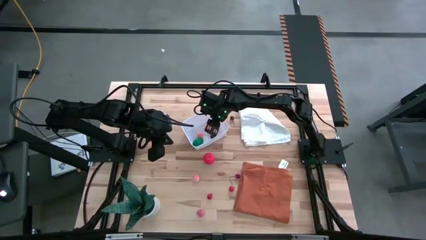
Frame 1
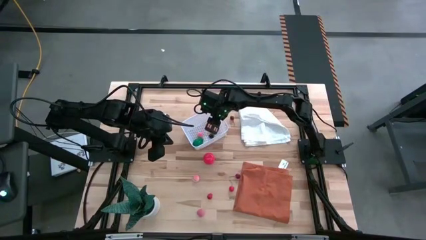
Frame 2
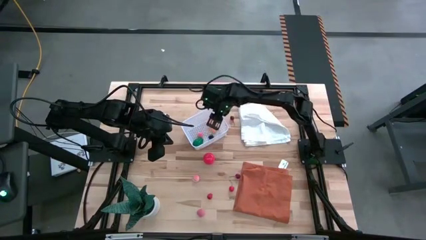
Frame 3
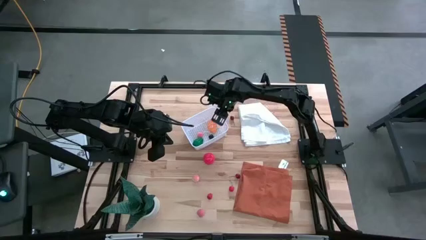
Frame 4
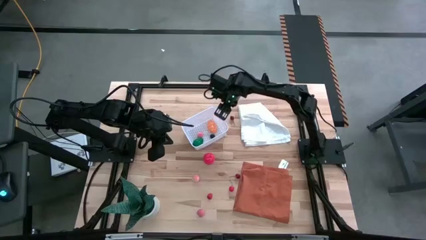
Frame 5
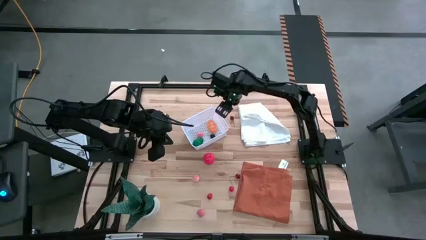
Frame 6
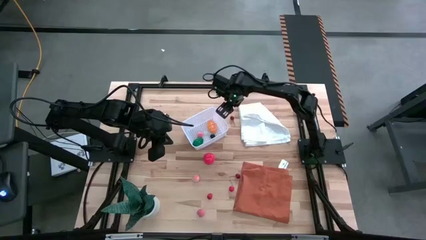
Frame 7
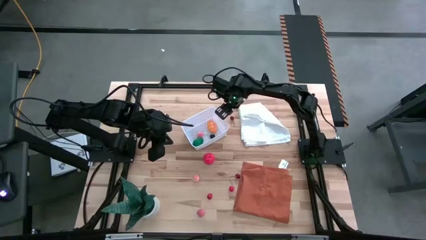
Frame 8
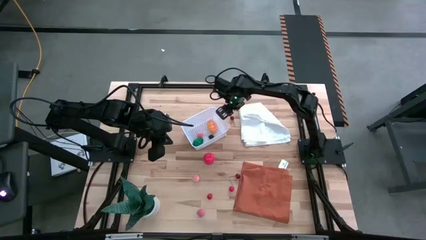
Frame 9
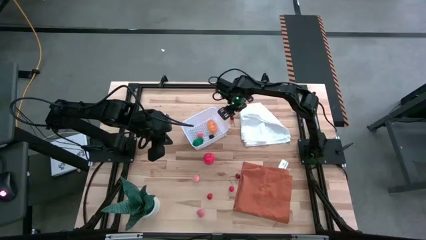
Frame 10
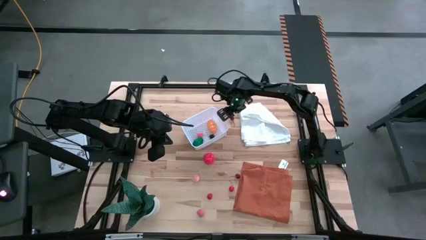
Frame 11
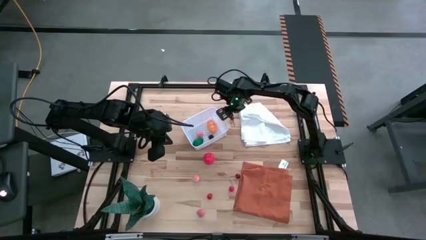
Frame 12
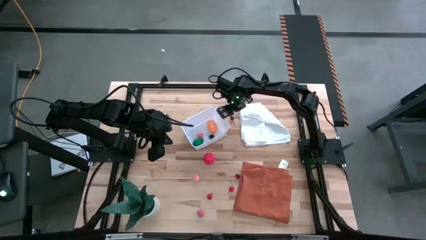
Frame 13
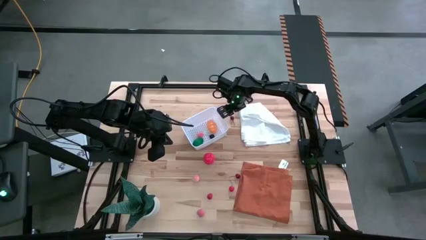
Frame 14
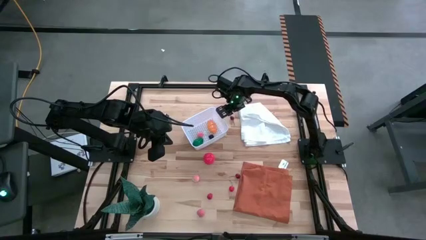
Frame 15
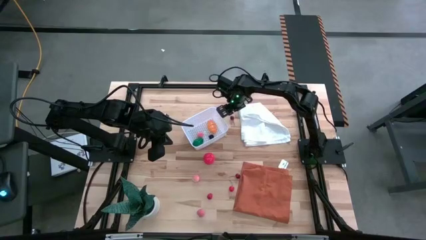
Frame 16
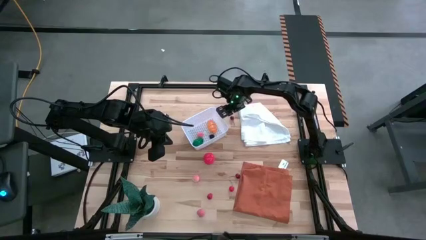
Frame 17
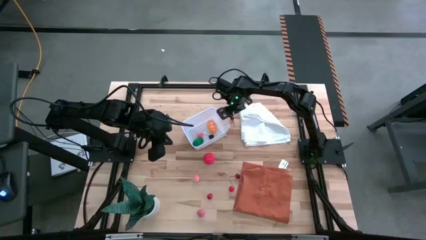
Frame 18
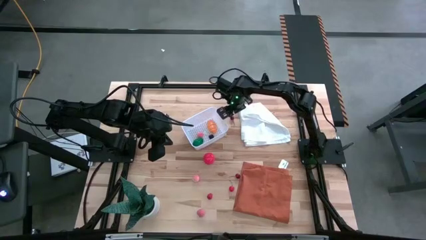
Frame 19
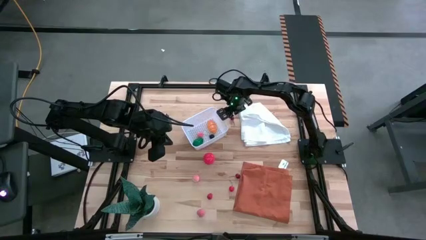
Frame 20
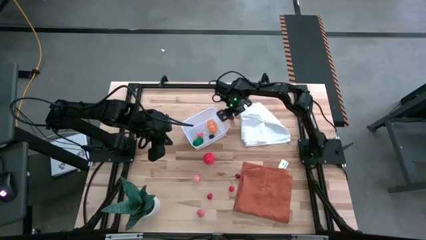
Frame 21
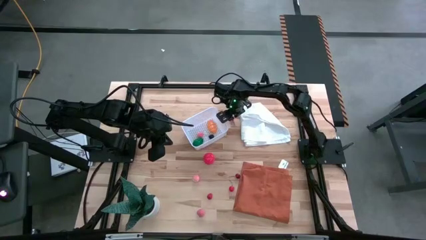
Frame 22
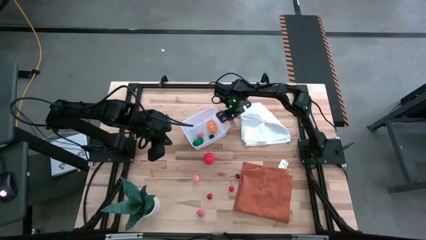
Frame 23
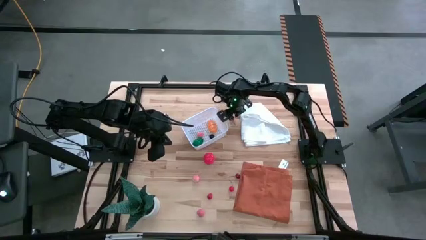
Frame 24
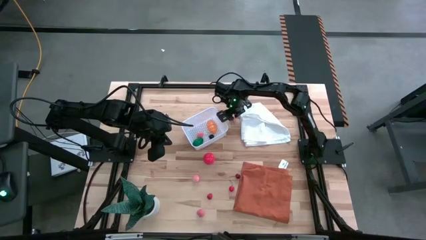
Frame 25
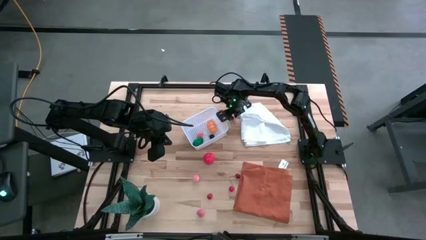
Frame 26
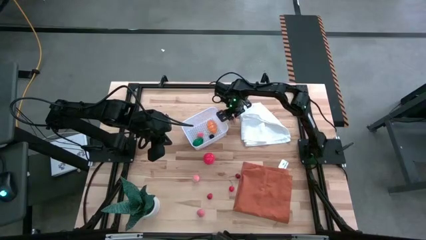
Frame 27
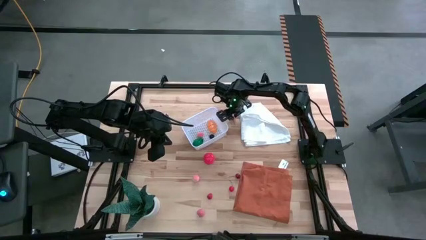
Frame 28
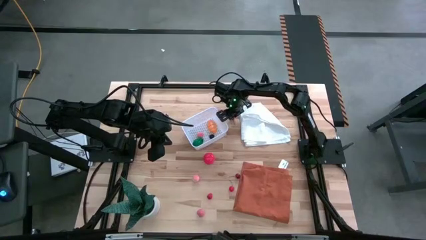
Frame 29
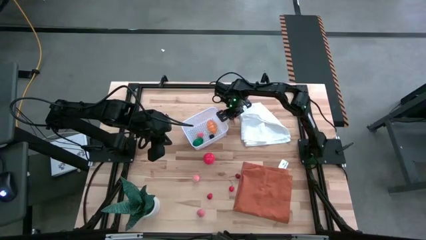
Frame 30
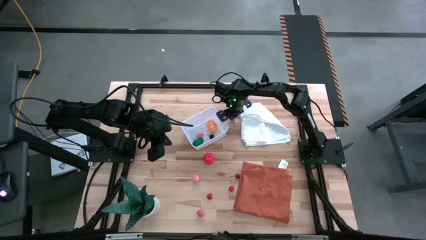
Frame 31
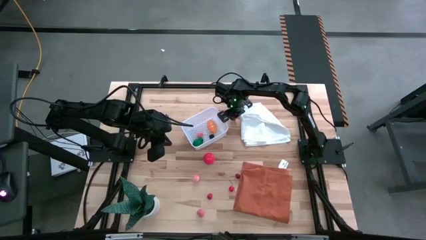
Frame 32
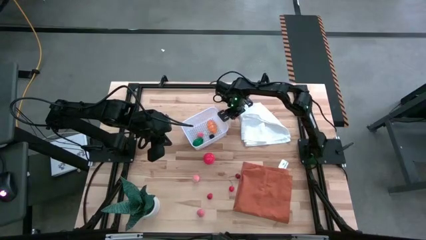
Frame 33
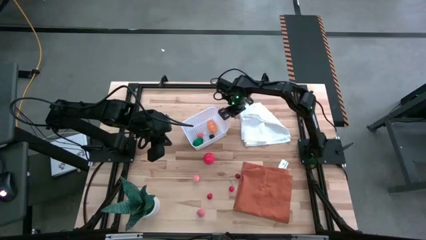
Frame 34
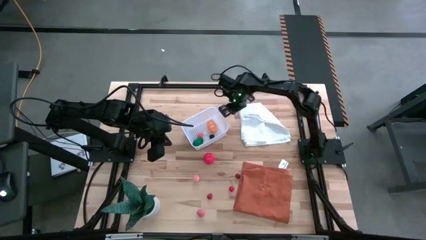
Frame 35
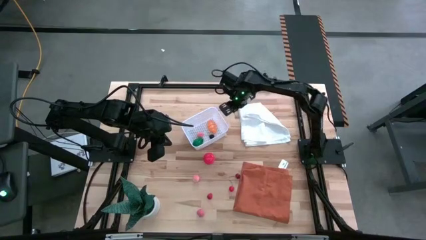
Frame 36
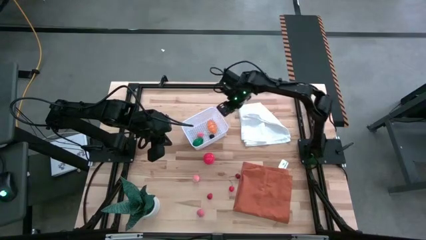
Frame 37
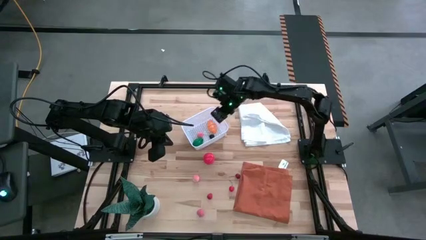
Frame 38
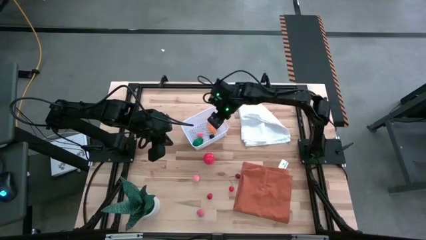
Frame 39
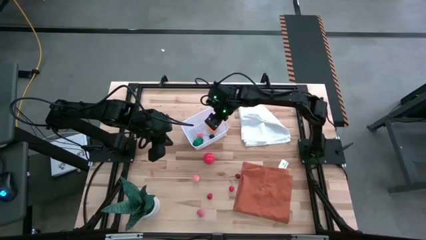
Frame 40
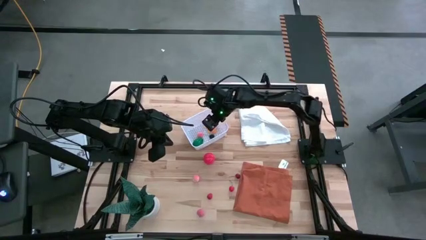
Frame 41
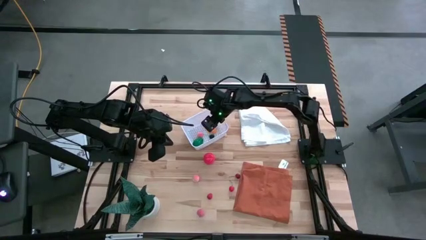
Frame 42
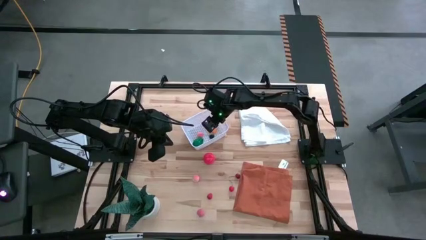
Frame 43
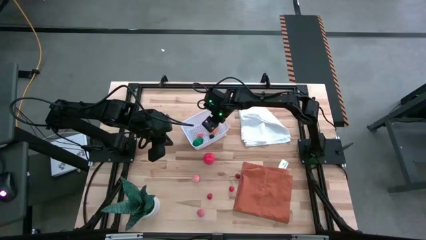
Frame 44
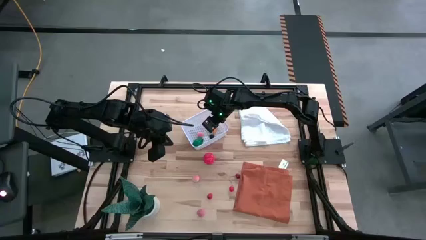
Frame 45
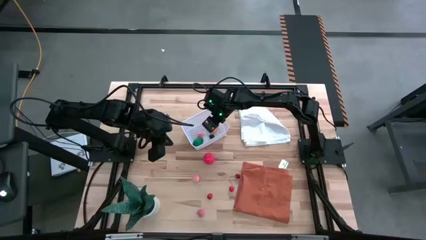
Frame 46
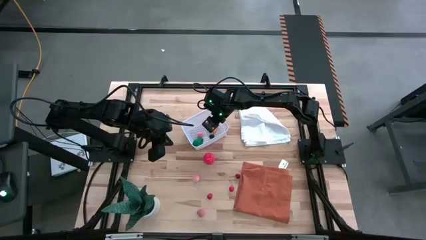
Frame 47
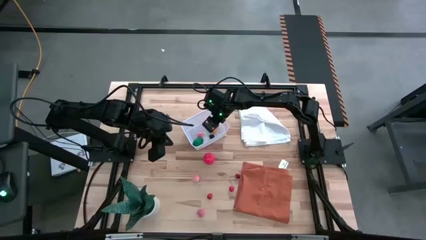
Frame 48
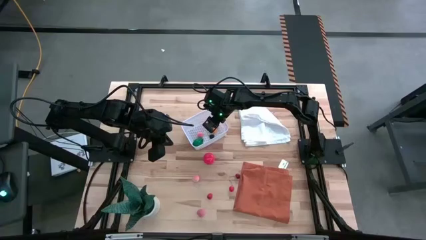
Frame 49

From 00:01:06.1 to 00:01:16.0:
Task: Pick and placing Produce into tupperware
Put the top red cherry in the basket

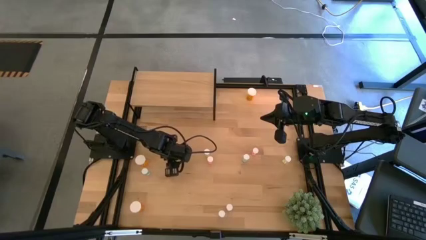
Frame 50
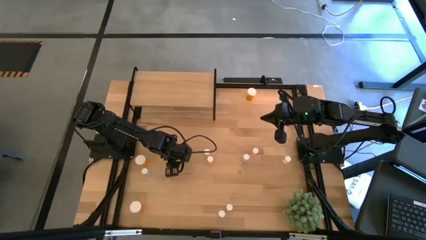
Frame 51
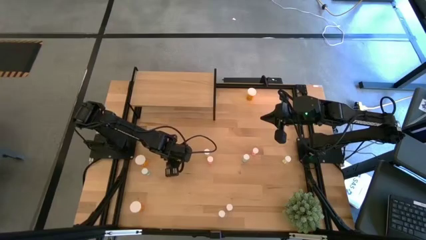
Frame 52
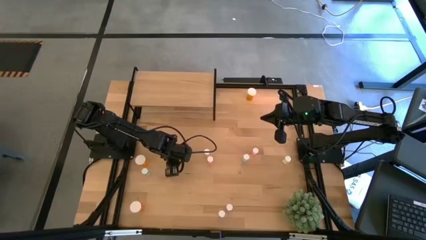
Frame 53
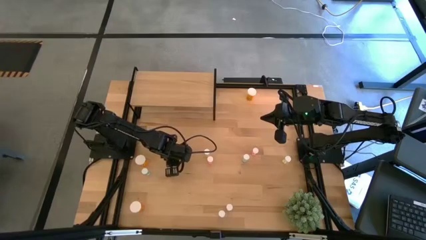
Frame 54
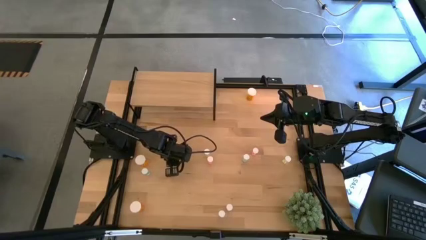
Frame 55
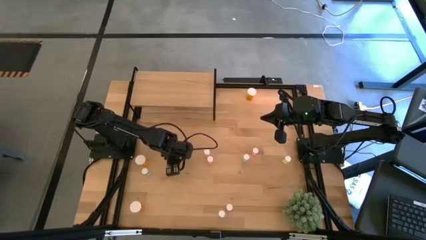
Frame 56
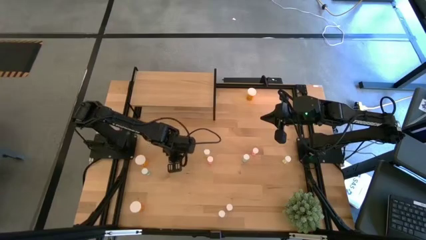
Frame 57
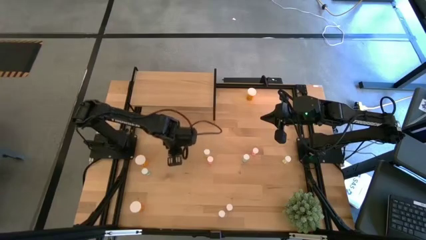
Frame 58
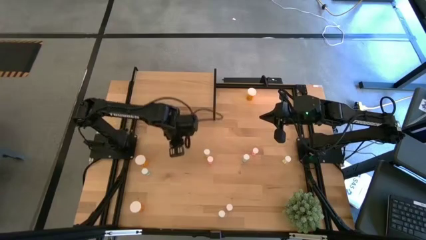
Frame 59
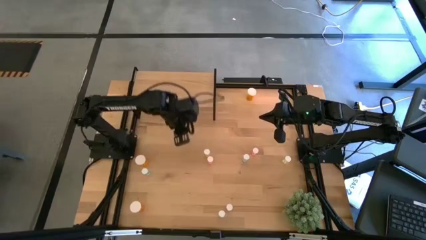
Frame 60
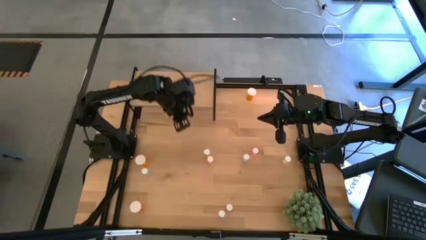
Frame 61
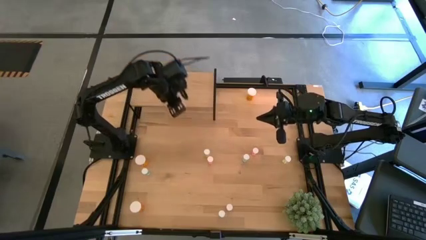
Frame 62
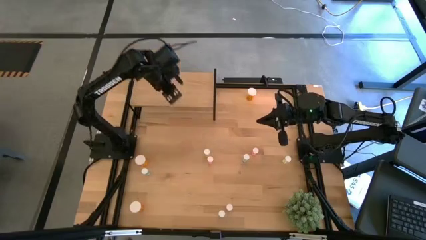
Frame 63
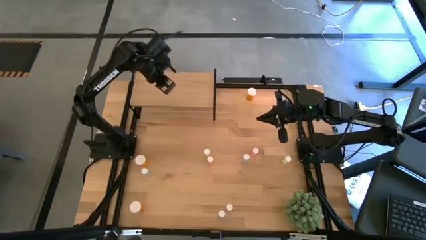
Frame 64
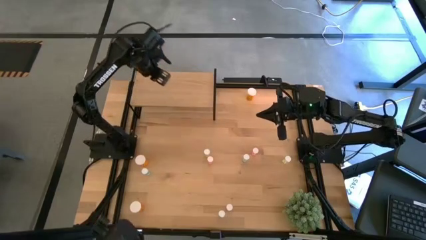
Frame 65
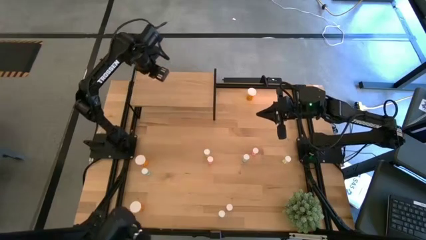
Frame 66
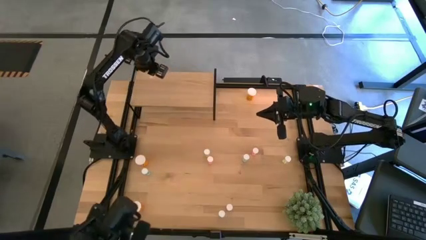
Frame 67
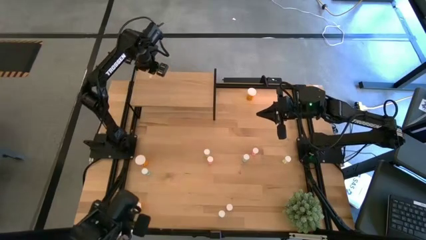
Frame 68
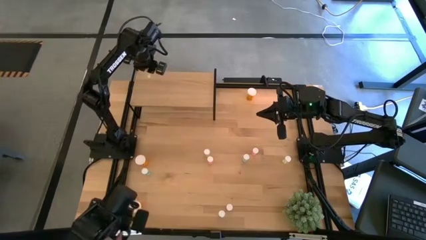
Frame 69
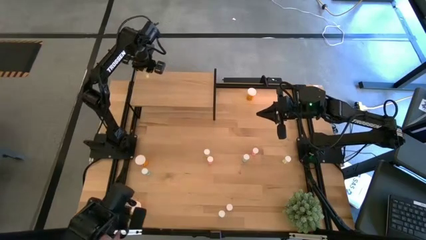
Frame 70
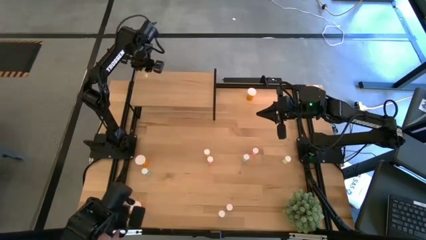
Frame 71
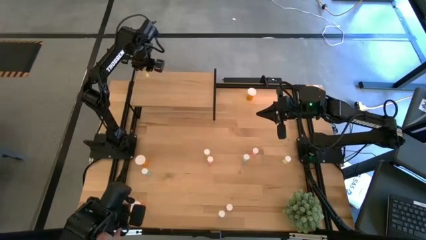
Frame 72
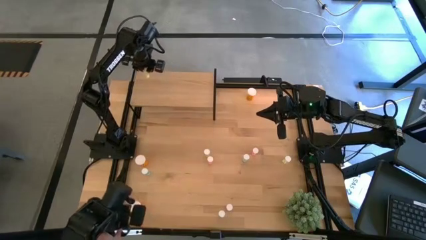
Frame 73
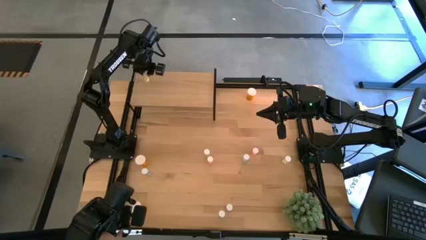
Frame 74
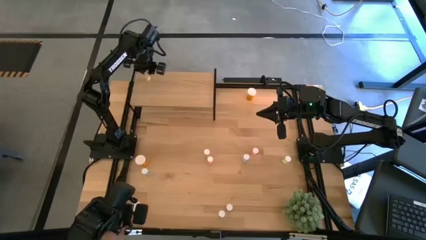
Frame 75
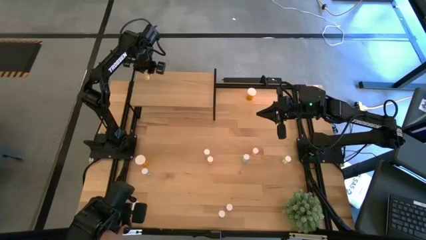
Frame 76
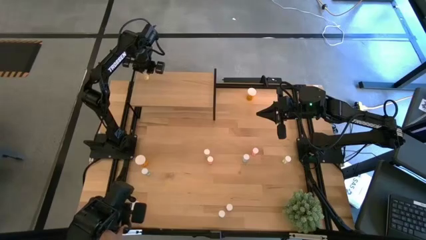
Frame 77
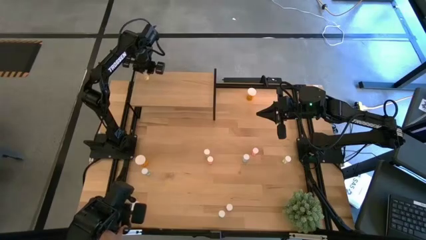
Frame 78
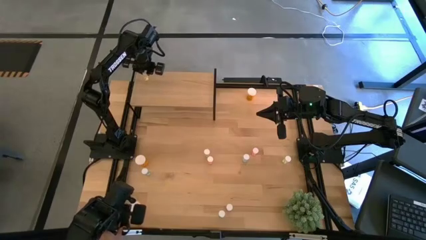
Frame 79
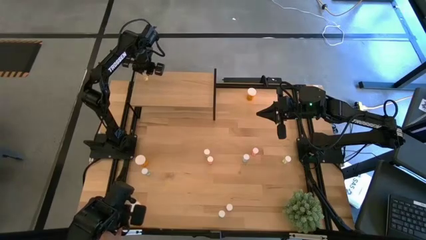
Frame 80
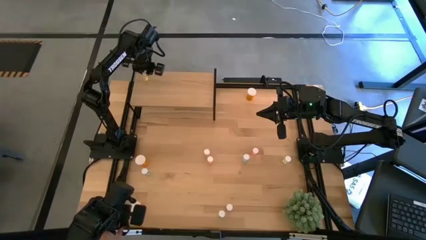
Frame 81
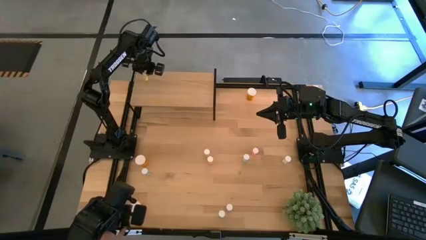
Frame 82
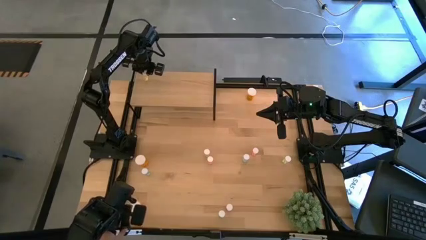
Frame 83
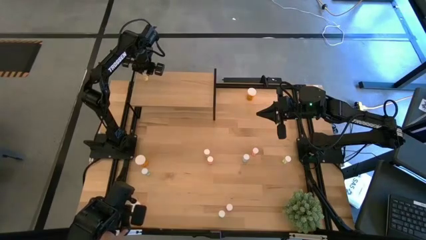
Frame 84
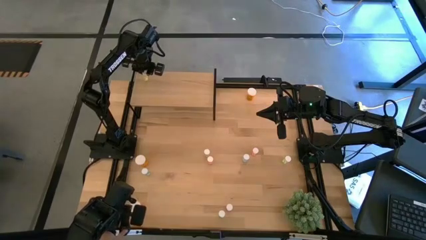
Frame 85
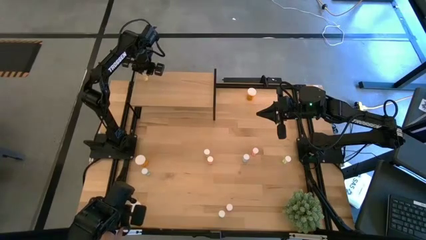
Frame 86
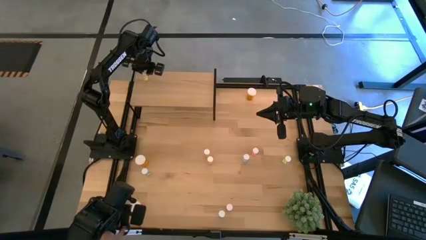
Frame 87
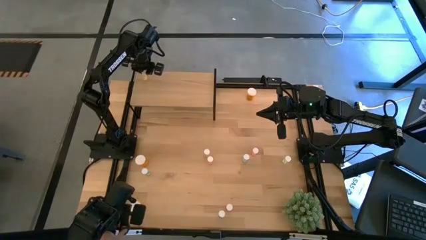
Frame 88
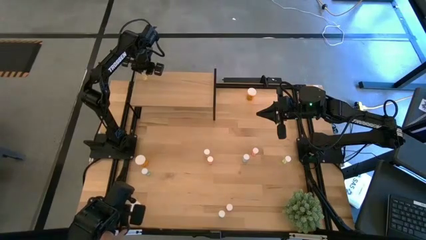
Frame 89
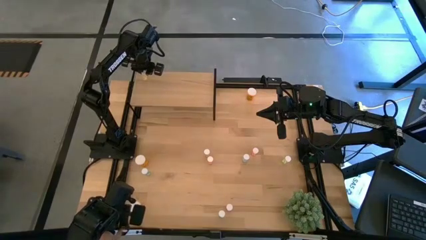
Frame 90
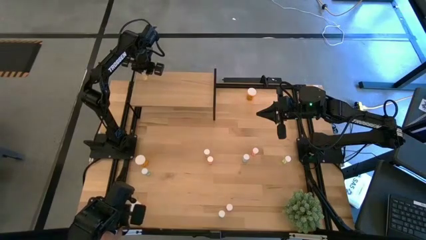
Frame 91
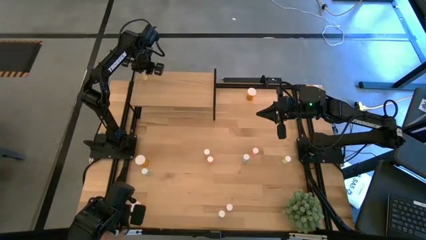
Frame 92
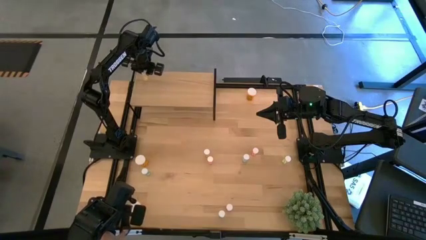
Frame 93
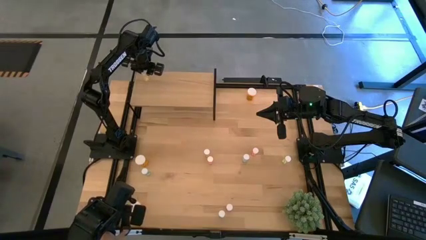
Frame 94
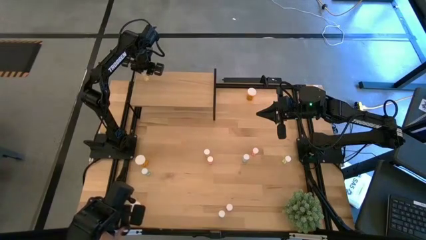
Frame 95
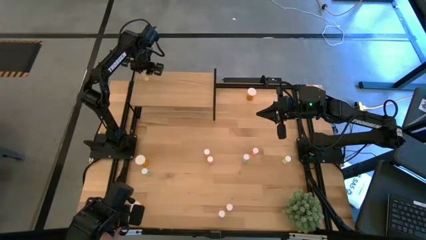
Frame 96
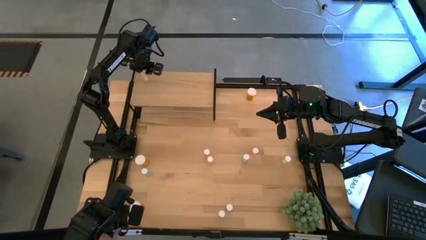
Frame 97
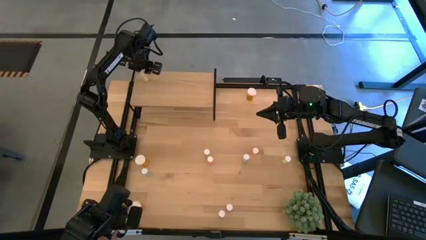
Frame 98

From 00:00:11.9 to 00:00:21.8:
Task: Pick and place medicine bottles onto shelf by color
Put the left small yellow pill on the shelf
